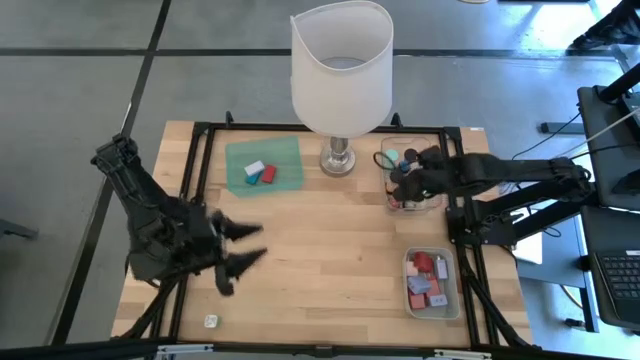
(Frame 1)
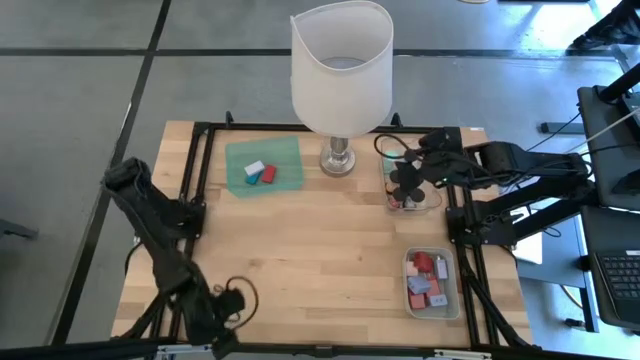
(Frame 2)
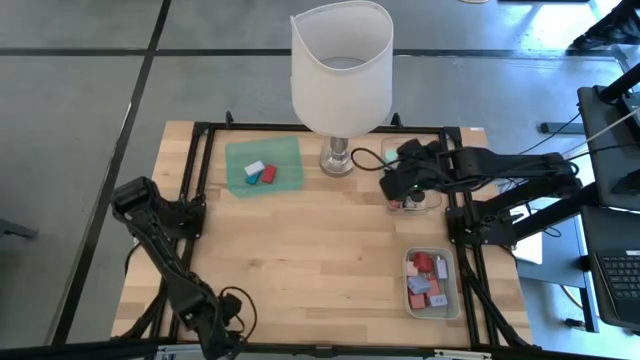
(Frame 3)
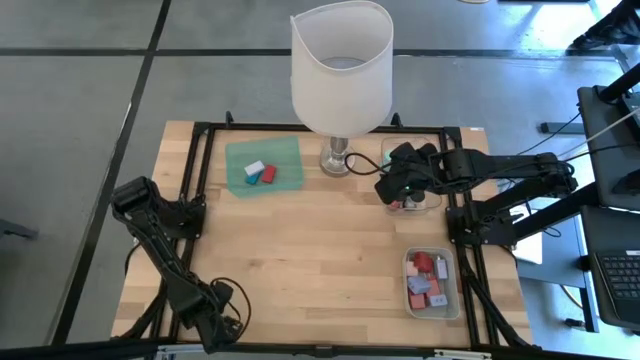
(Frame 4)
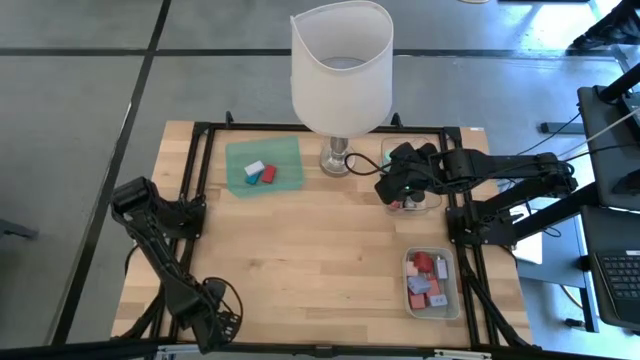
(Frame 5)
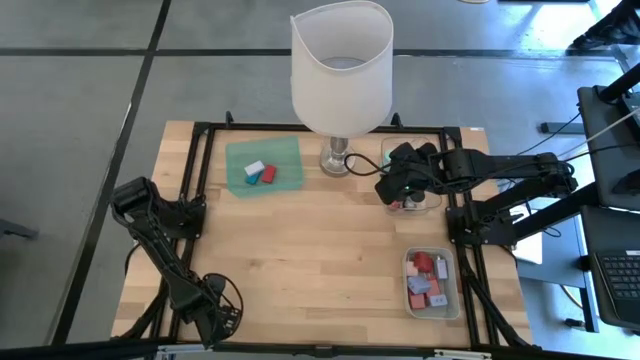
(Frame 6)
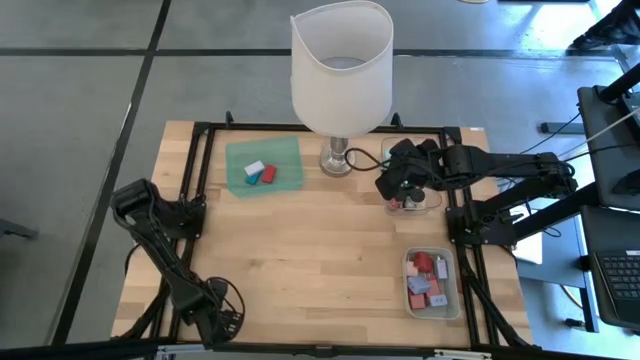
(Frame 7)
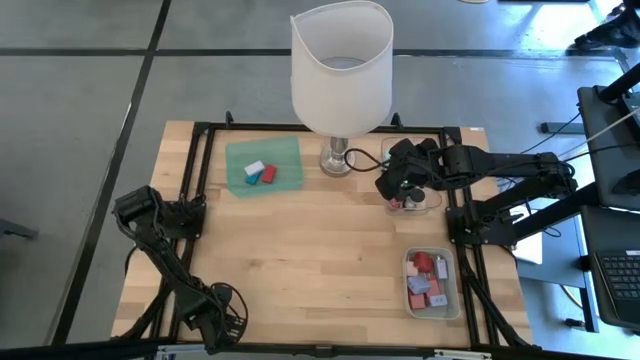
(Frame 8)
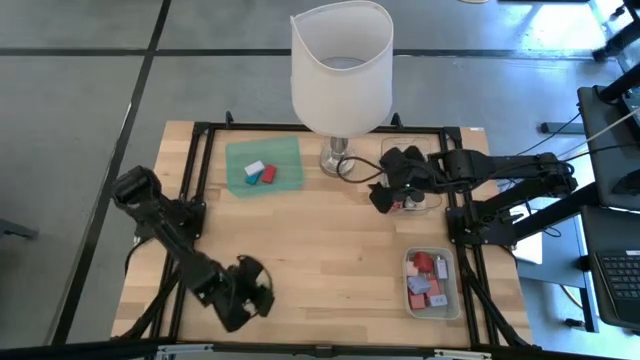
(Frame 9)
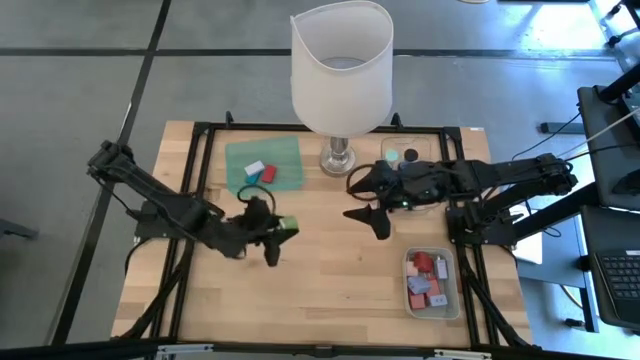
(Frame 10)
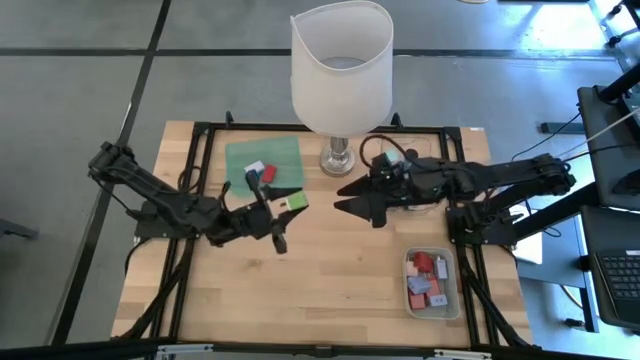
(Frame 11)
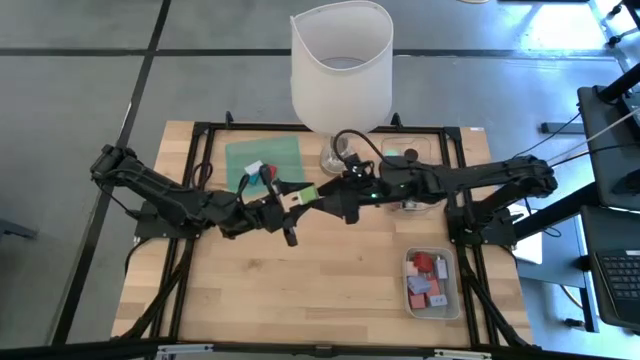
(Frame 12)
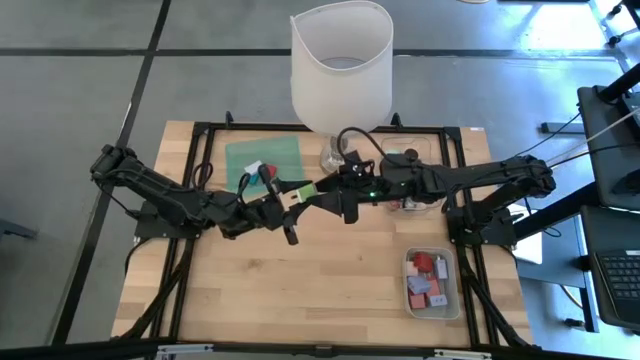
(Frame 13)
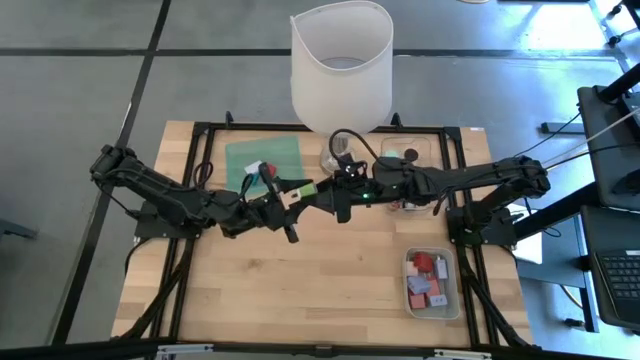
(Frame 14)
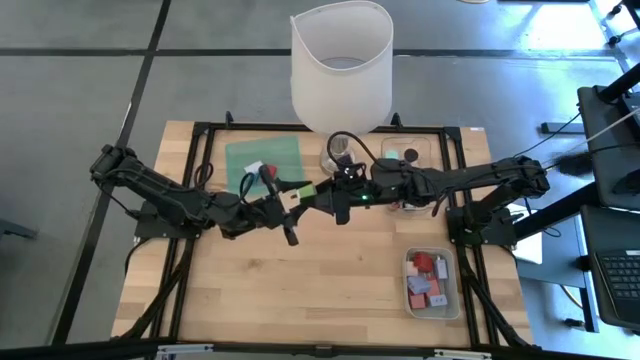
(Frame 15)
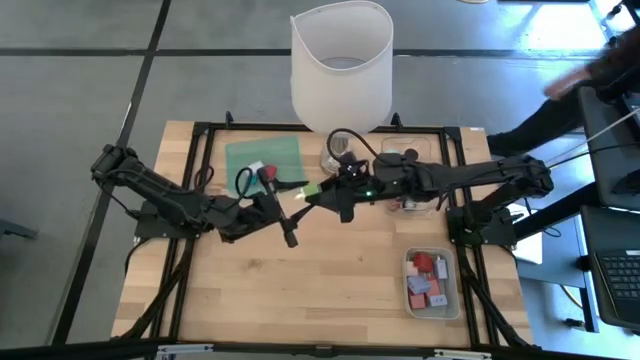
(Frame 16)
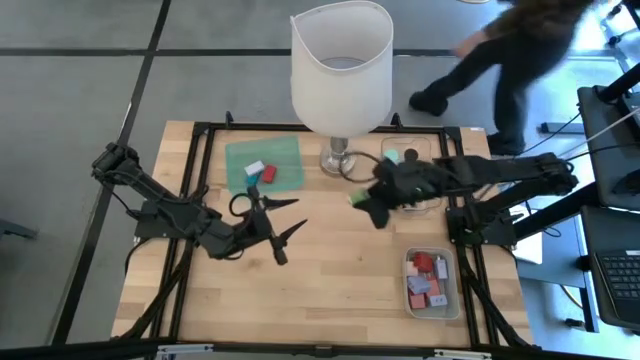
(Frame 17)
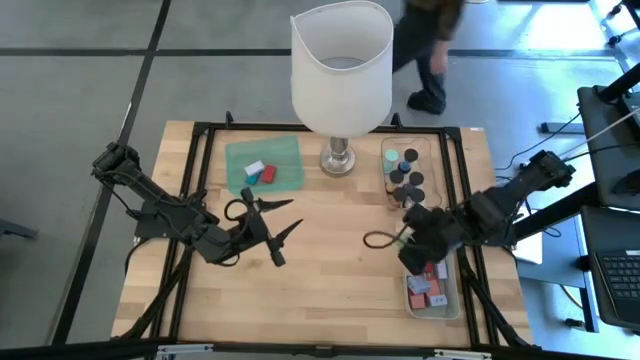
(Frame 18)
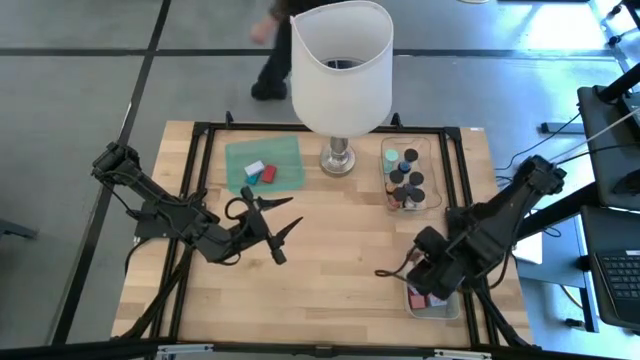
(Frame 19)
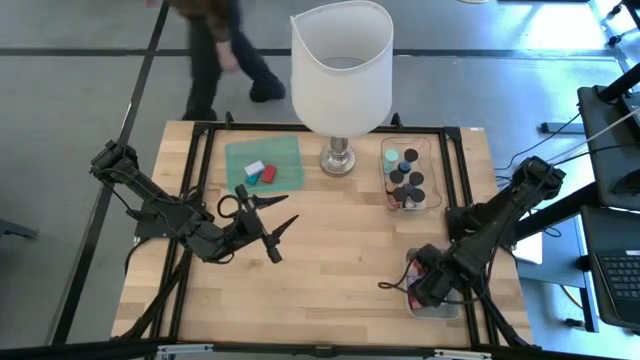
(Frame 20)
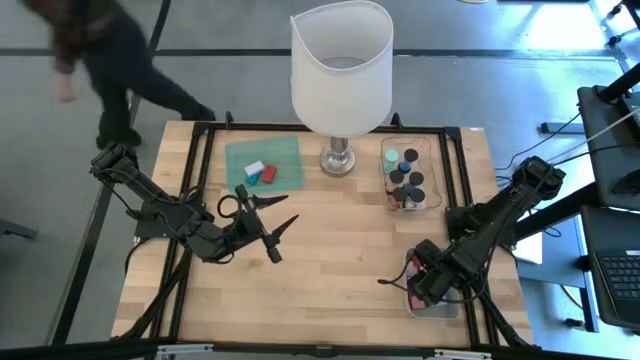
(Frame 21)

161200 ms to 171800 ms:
Task: Pick & Place Office items
Put the green charger adapter into the gray bin

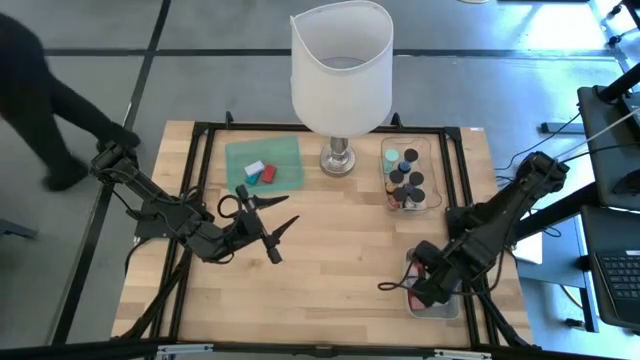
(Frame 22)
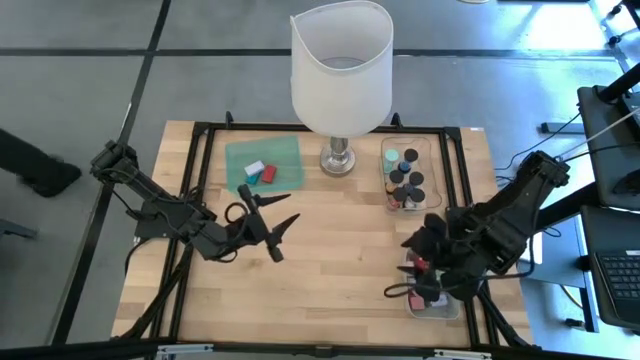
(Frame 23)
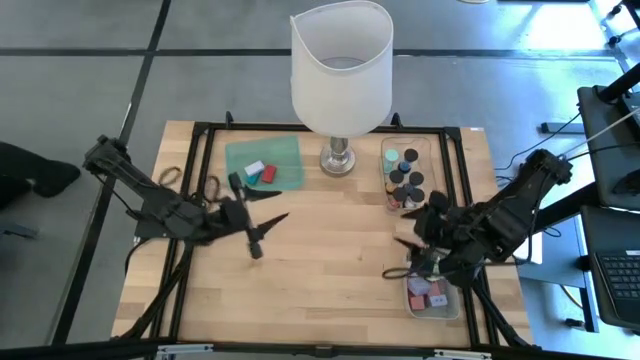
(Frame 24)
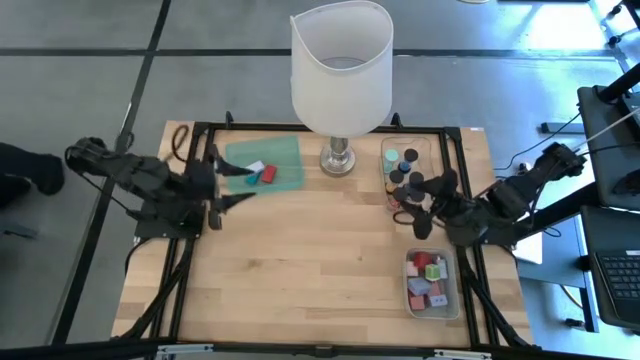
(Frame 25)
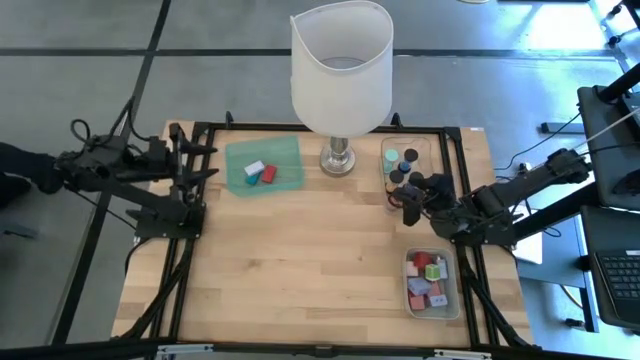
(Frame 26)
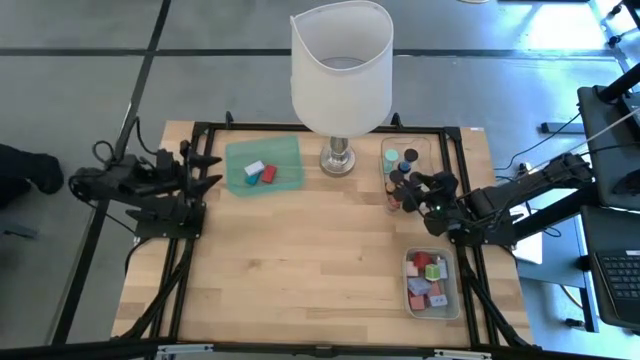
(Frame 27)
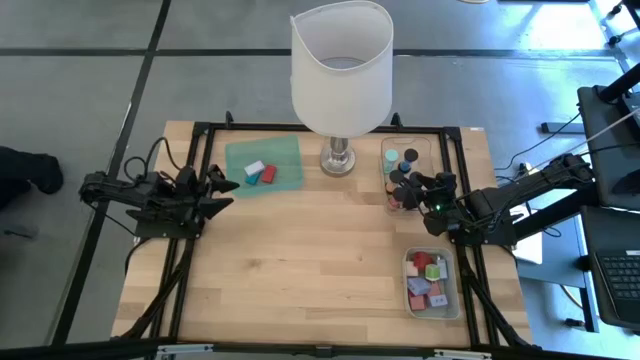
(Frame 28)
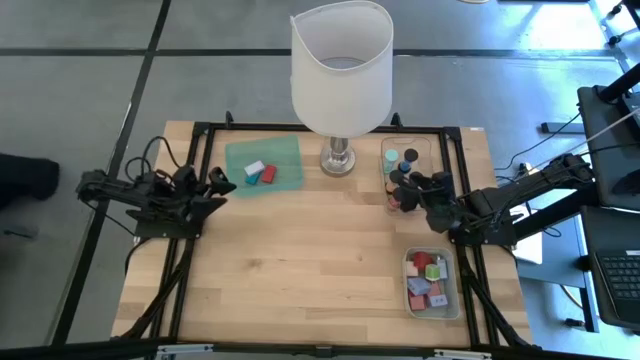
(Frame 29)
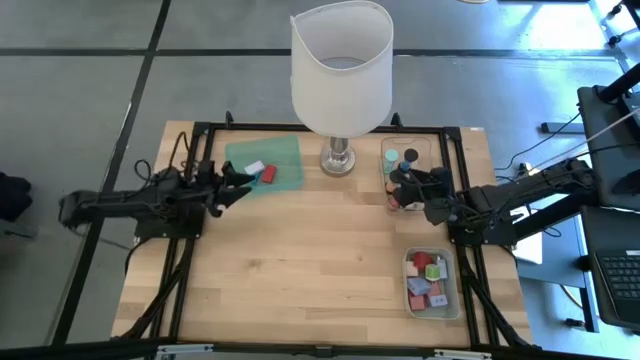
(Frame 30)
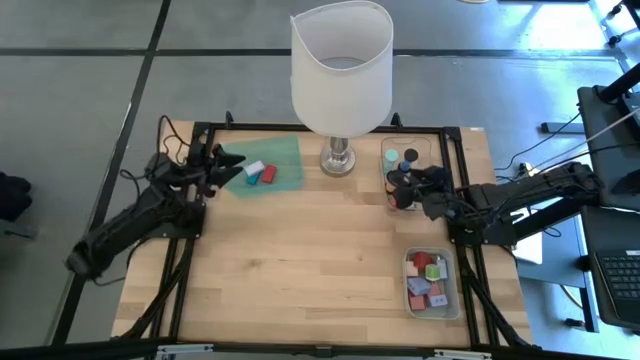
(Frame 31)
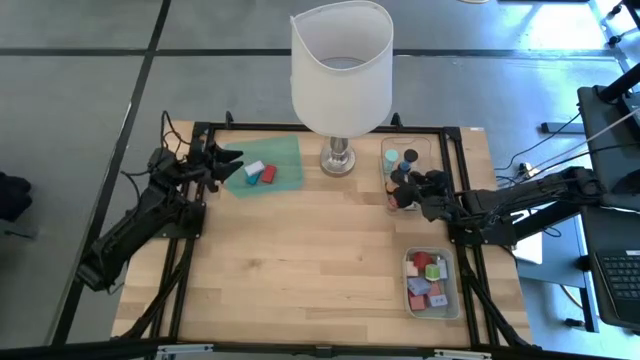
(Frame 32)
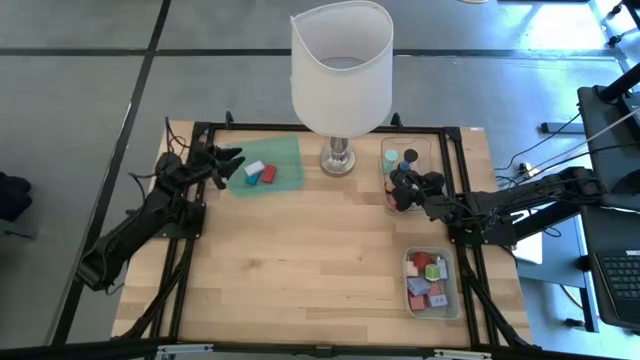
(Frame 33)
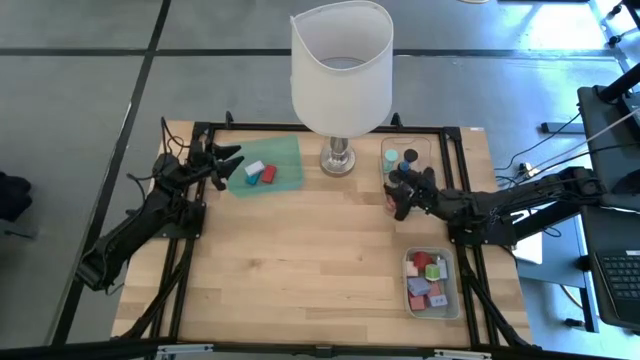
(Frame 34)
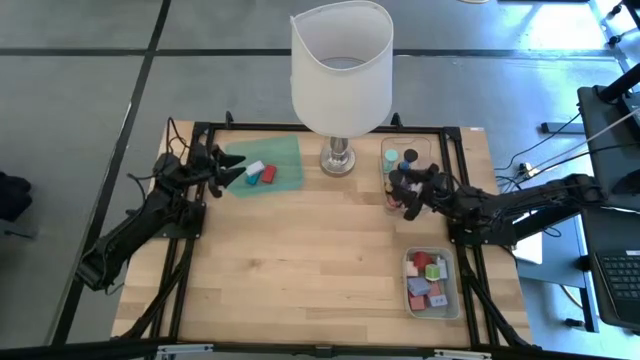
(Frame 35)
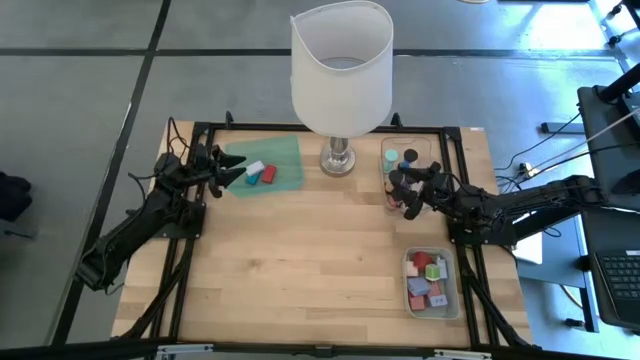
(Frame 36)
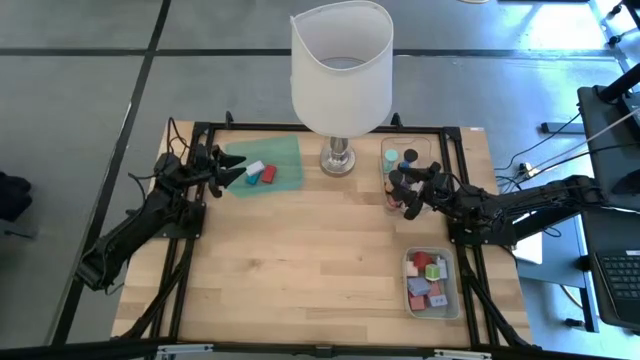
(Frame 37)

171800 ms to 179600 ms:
Return to Home Position
